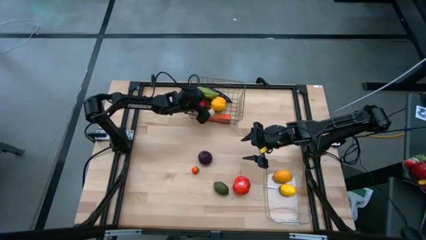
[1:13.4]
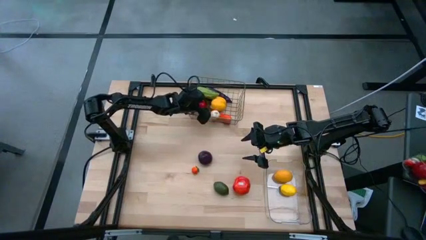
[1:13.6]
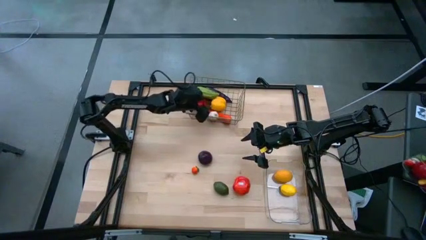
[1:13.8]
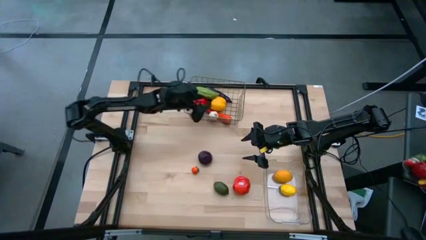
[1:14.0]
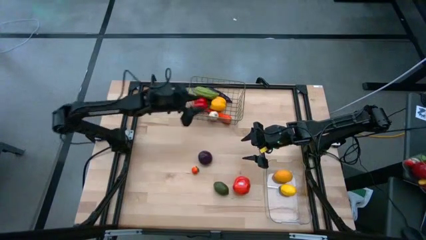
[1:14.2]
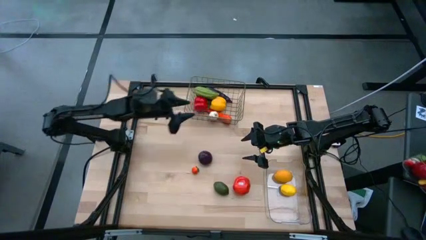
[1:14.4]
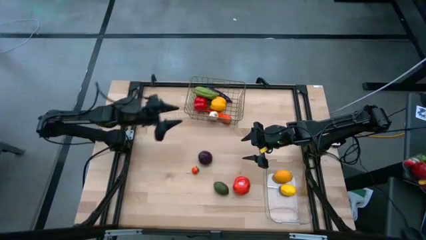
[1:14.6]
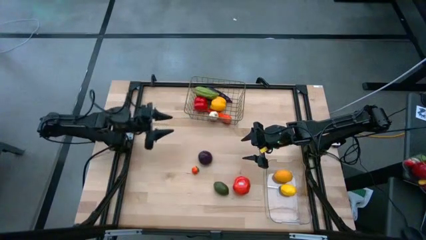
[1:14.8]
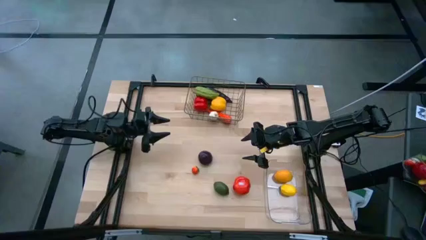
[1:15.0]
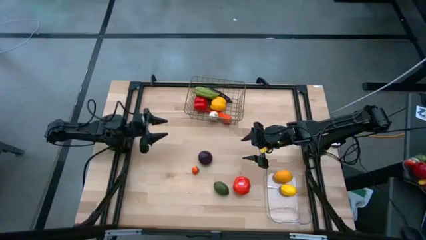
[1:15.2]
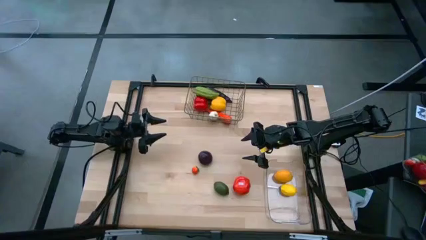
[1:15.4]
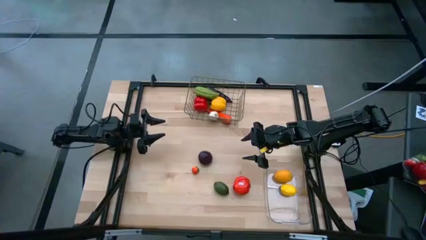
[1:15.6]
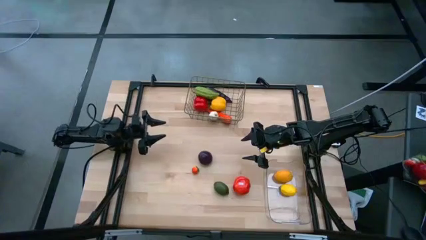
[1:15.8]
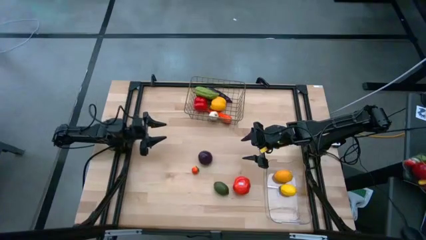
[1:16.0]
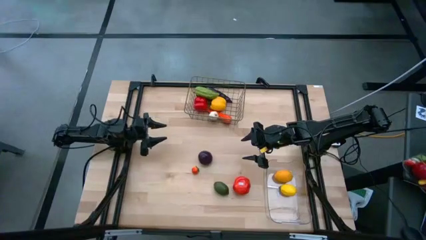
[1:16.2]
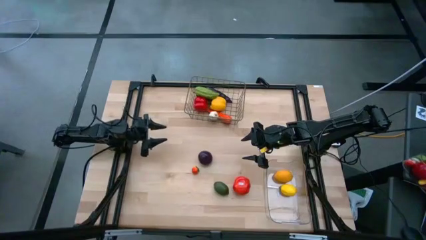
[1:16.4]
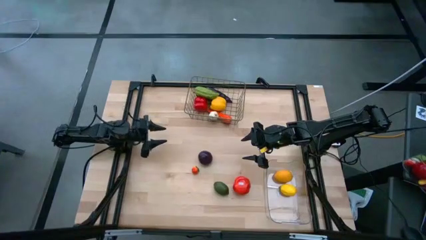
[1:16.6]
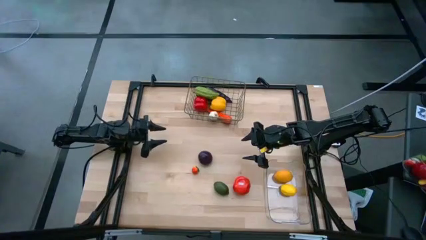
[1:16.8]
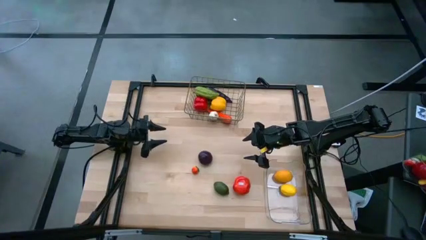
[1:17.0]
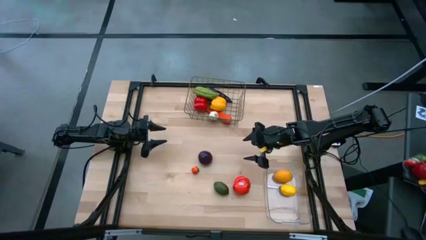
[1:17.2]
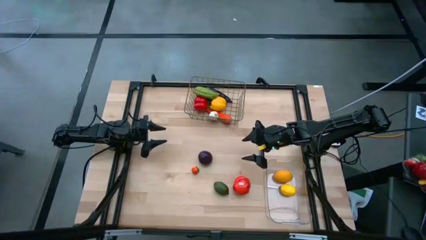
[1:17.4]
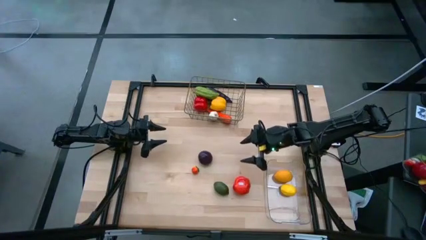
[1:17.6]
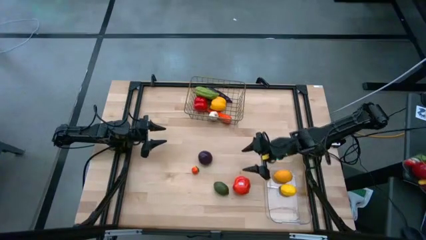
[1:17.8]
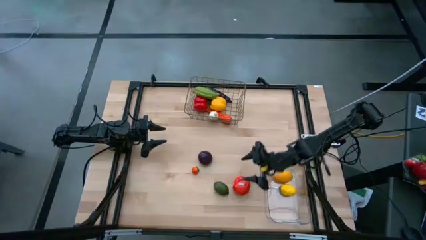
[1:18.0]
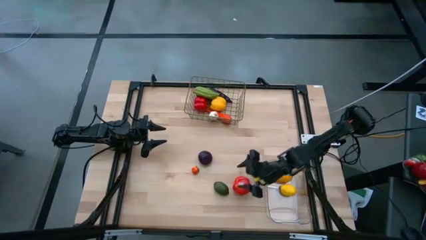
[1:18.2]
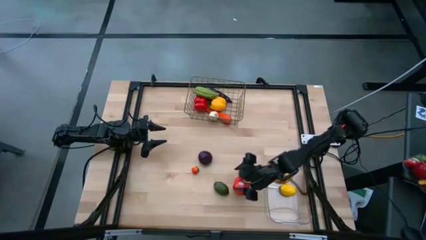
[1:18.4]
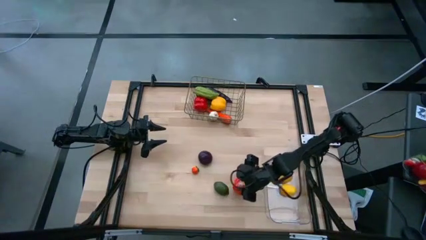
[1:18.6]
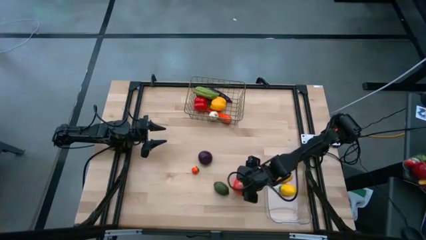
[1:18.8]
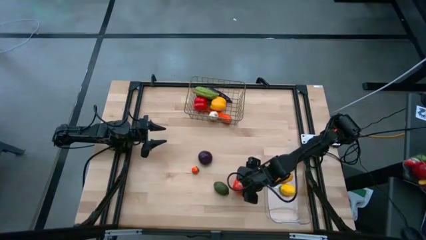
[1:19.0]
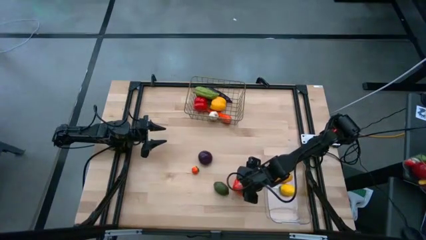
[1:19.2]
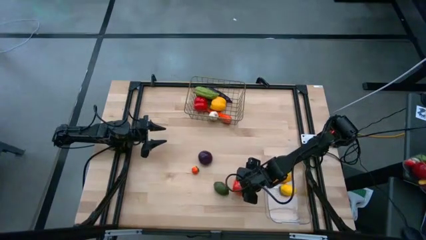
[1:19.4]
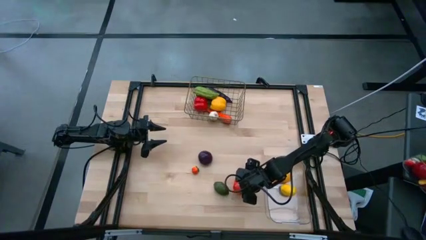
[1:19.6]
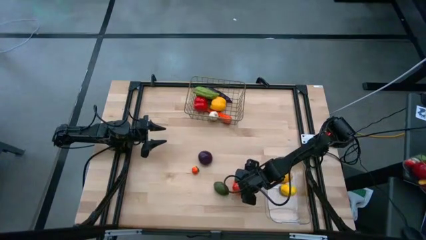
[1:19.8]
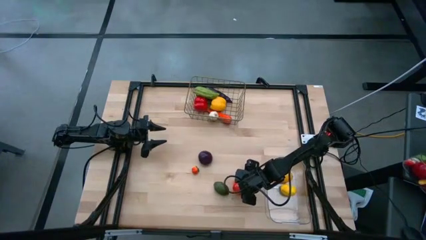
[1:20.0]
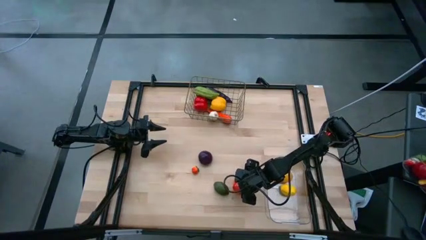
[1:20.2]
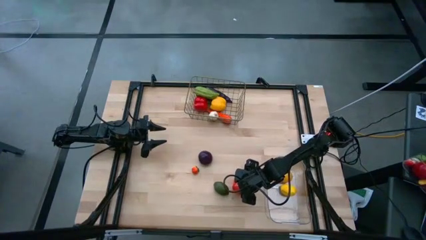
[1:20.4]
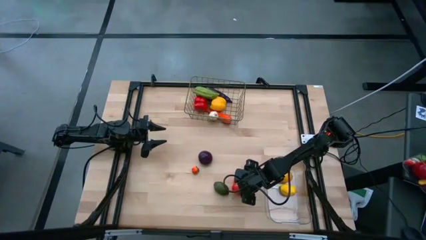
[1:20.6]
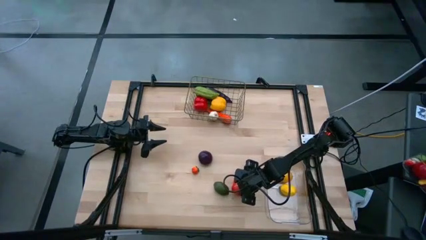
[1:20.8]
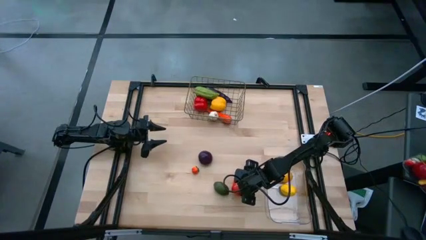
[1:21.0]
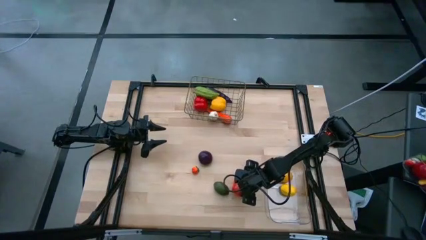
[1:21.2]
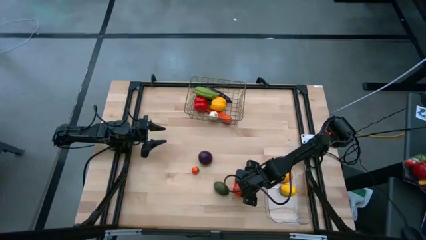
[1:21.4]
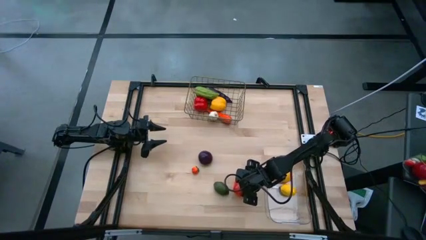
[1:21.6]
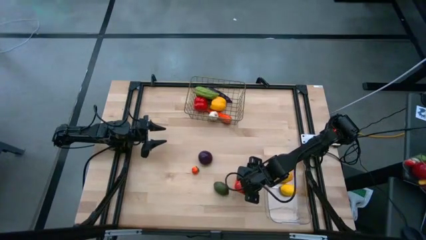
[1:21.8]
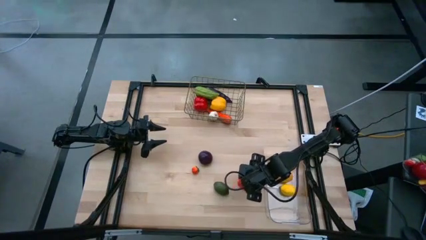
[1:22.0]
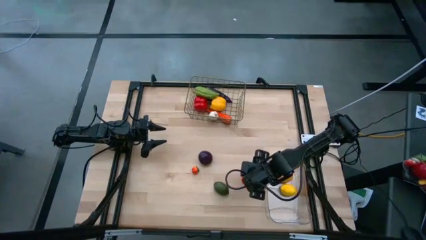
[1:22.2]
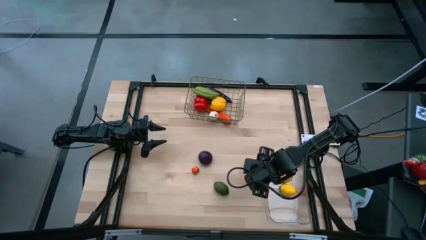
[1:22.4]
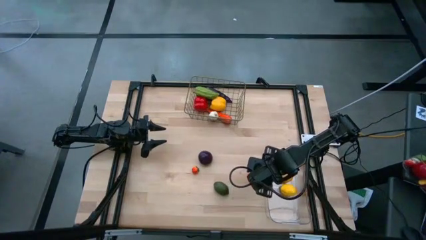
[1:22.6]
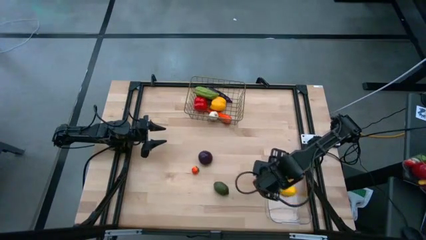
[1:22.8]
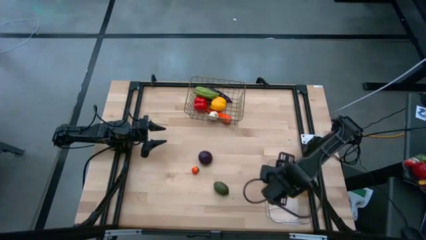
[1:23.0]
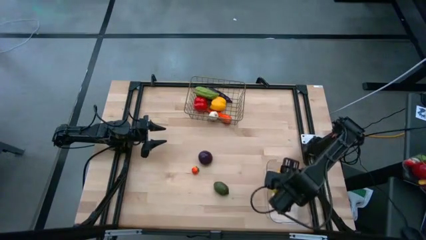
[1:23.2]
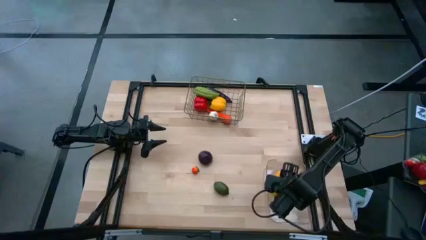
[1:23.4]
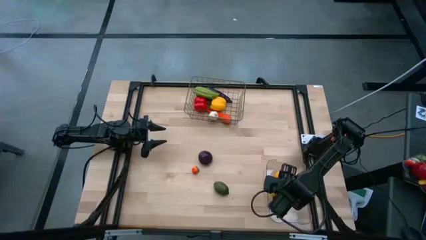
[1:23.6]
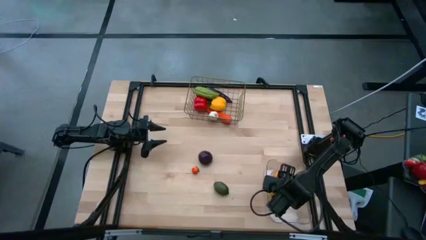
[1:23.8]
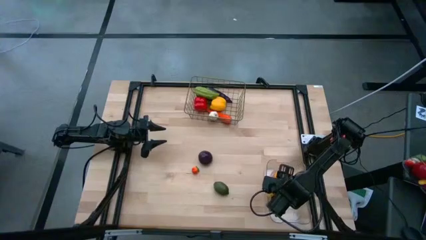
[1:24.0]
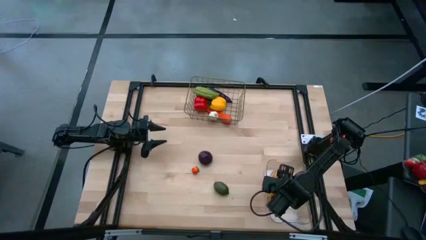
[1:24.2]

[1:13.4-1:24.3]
Task: Sort produce into baskets
Put the red tomato into the transparent bin

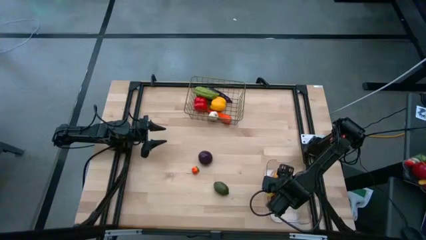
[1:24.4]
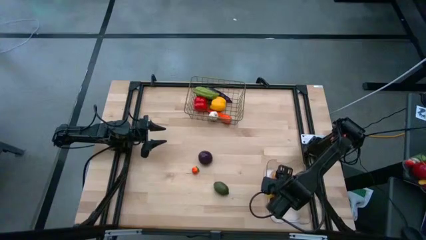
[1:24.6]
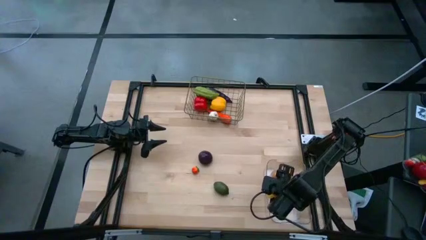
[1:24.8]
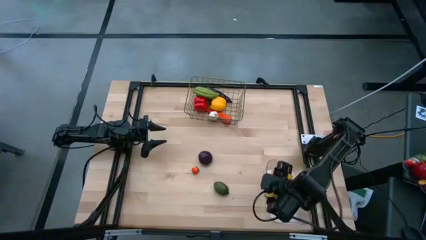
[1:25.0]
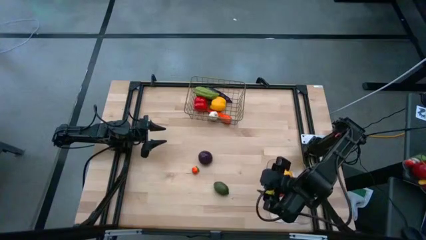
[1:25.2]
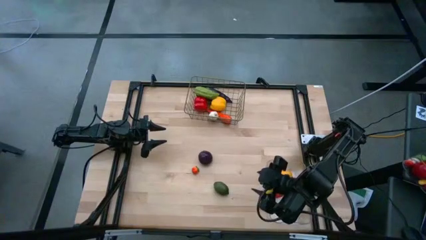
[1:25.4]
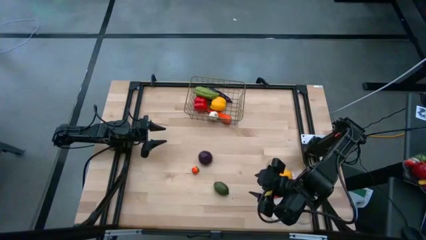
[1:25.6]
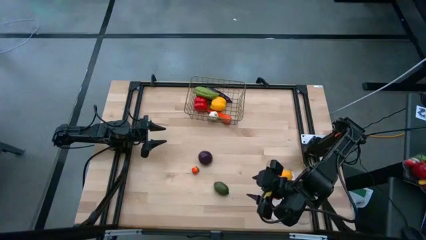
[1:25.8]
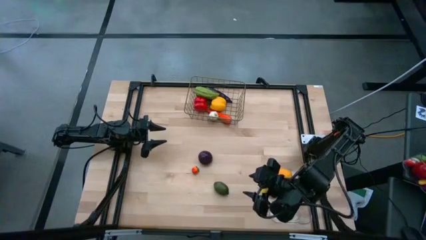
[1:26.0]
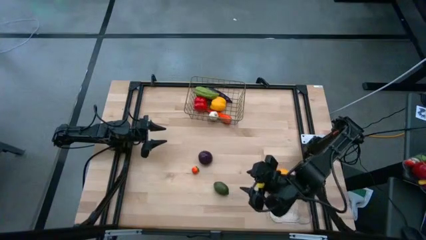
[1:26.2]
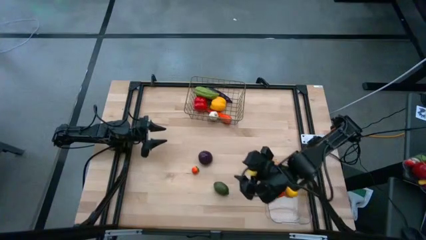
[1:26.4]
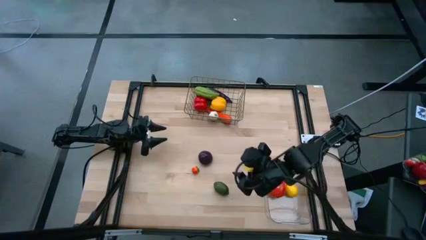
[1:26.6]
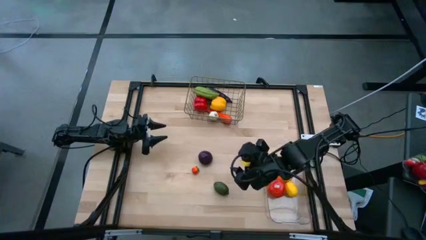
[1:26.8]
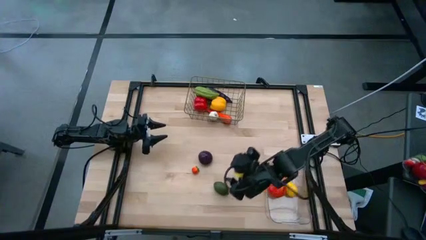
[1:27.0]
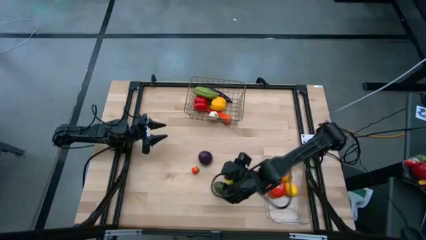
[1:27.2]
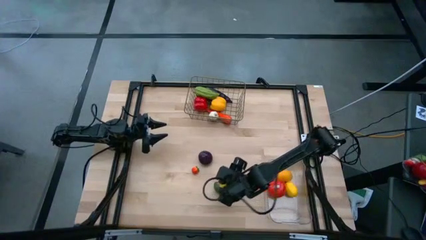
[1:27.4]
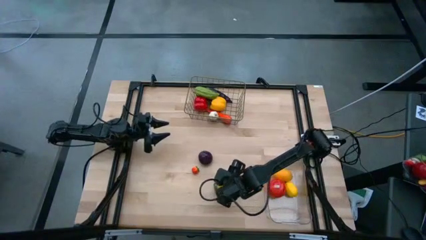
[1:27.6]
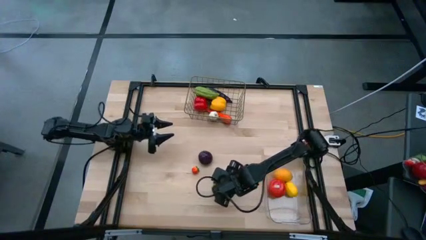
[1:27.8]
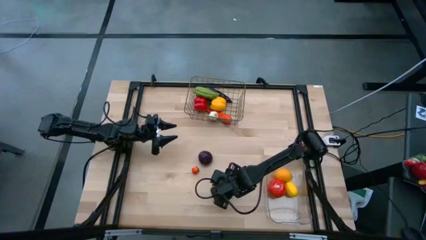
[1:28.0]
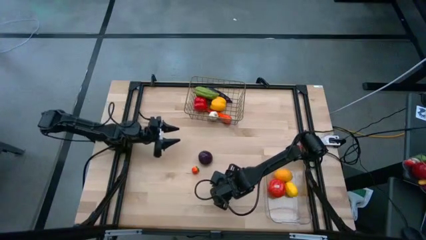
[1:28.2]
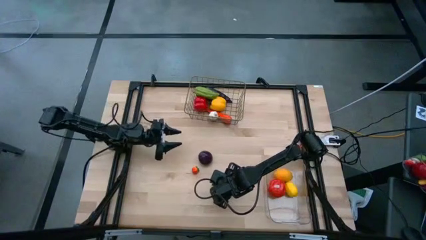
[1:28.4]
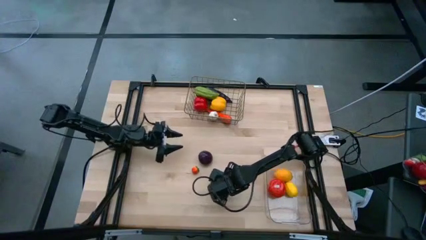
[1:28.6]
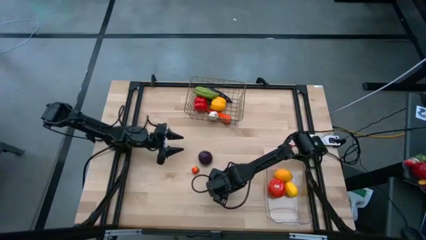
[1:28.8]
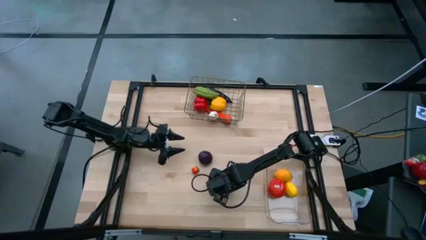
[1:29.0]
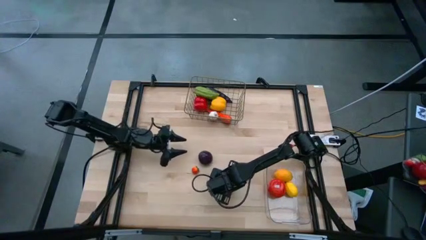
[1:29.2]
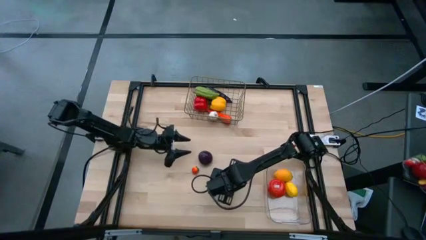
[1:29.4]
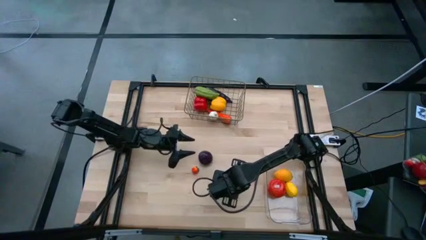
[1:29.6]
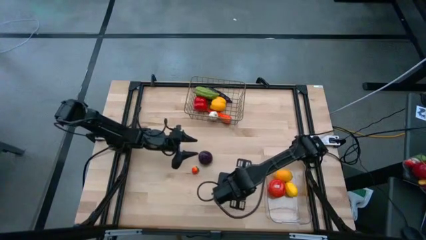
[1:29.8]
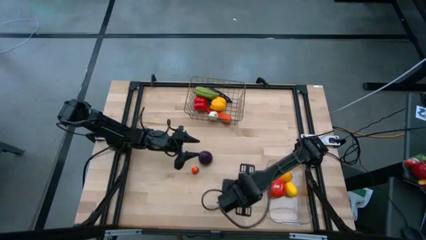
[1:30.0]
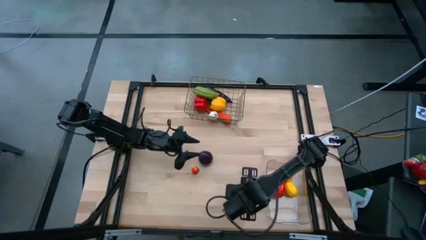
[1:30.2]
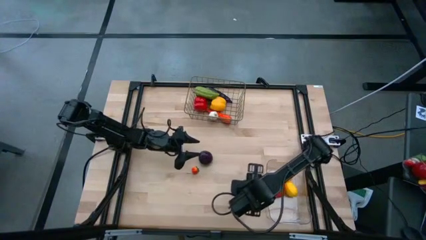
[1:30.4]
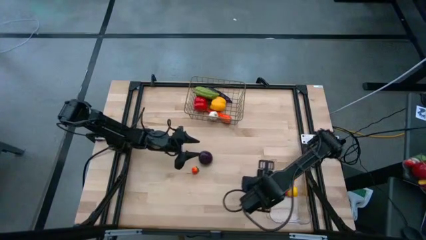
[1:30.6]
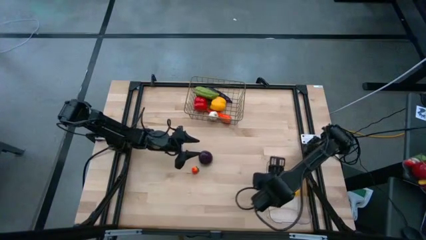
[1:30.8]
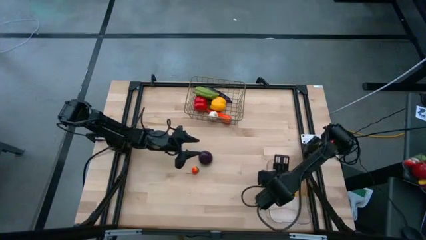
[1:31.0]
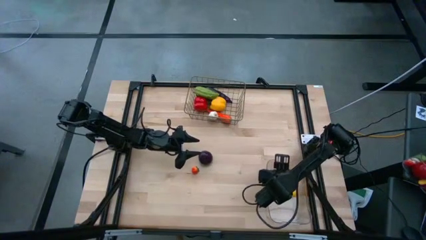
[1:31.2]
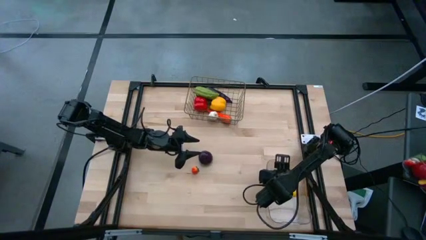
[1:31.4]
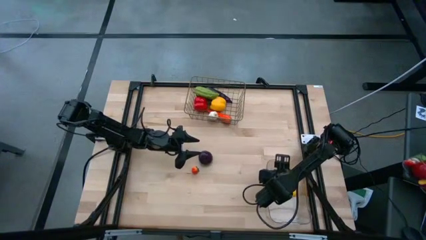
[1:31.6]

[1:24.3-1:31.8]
Put the green lime into the transparent bin
